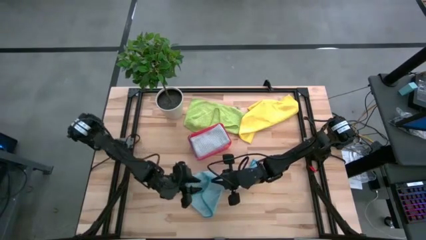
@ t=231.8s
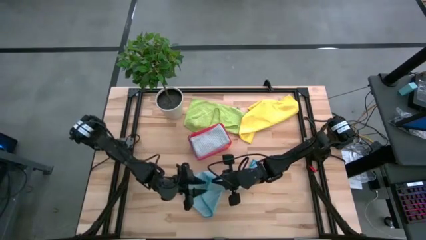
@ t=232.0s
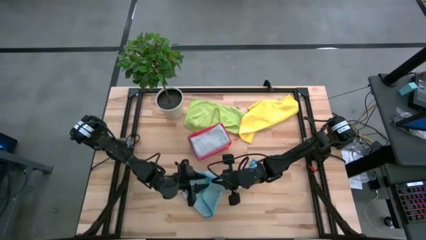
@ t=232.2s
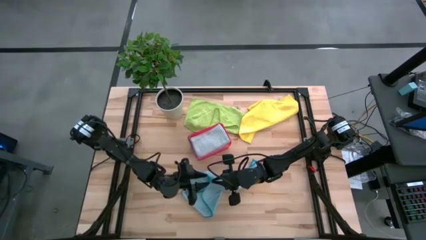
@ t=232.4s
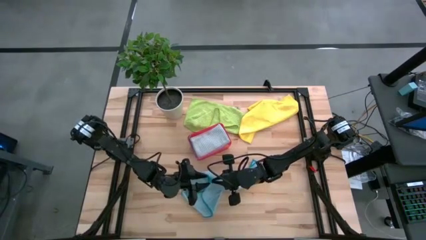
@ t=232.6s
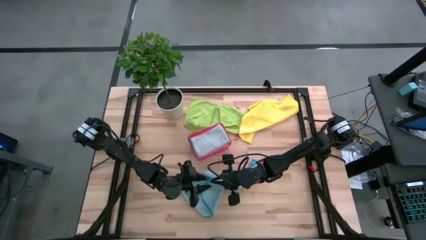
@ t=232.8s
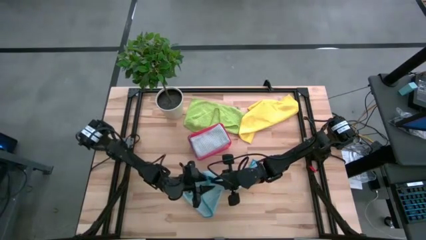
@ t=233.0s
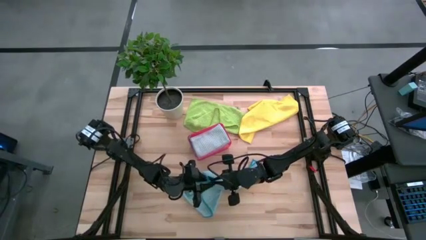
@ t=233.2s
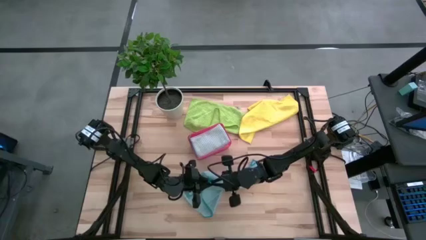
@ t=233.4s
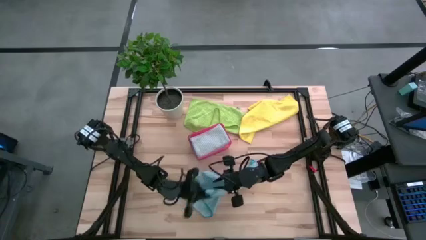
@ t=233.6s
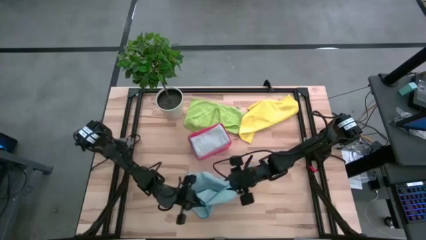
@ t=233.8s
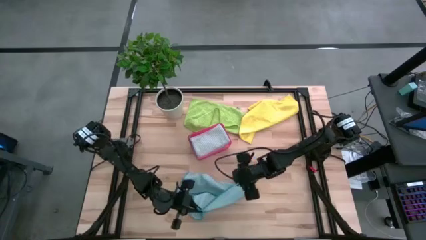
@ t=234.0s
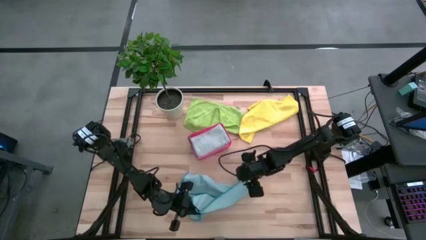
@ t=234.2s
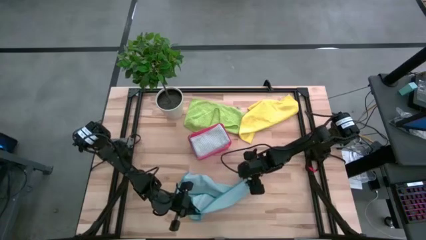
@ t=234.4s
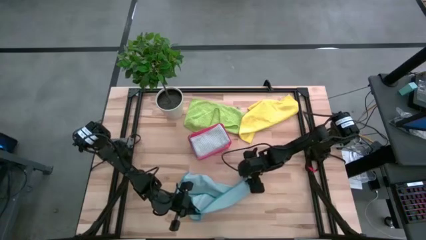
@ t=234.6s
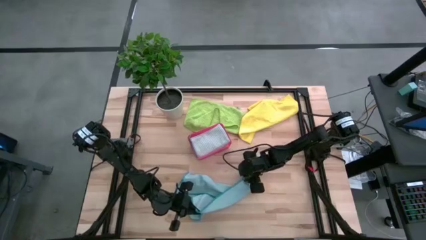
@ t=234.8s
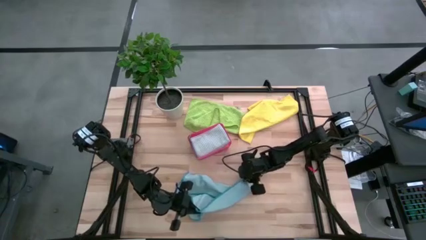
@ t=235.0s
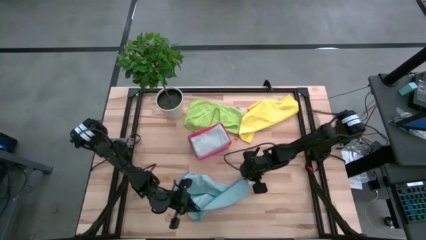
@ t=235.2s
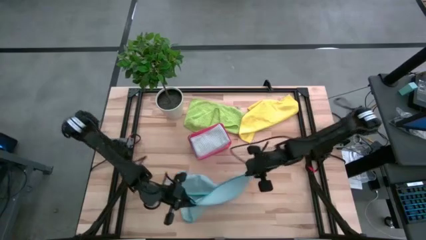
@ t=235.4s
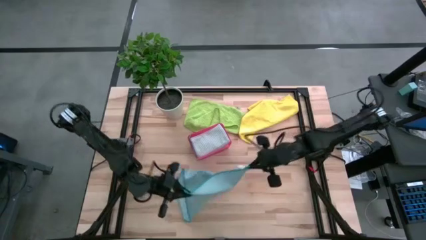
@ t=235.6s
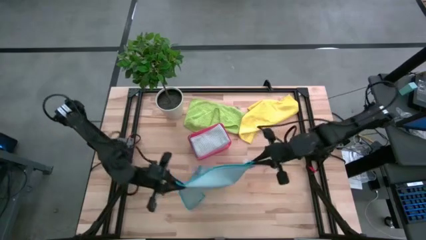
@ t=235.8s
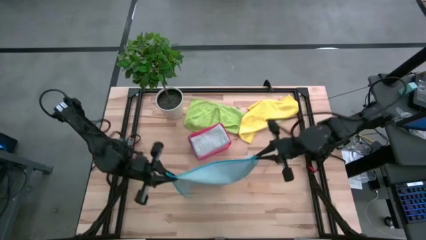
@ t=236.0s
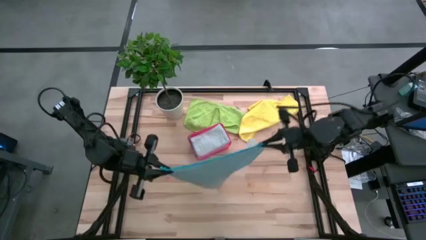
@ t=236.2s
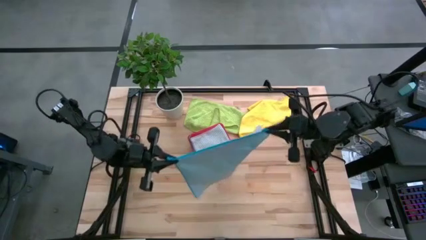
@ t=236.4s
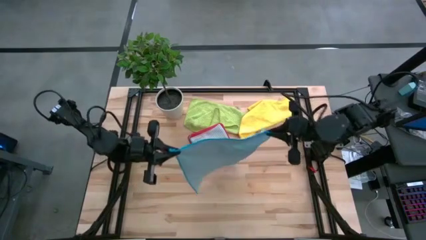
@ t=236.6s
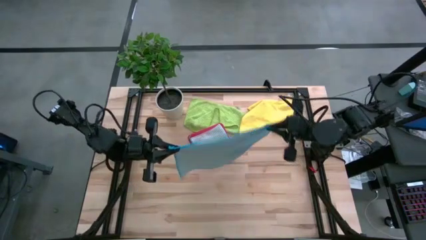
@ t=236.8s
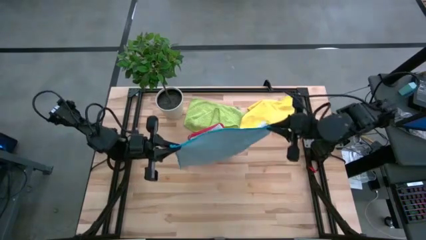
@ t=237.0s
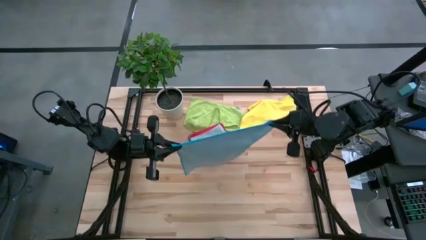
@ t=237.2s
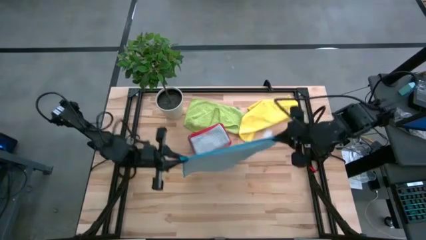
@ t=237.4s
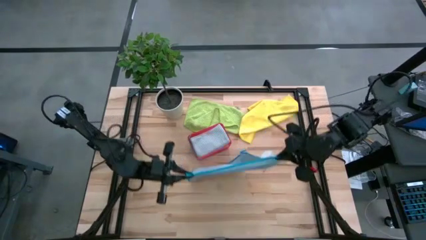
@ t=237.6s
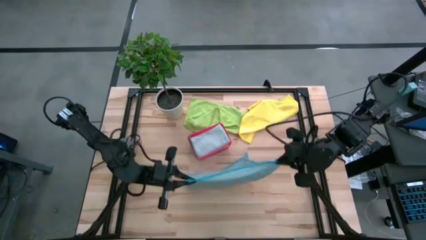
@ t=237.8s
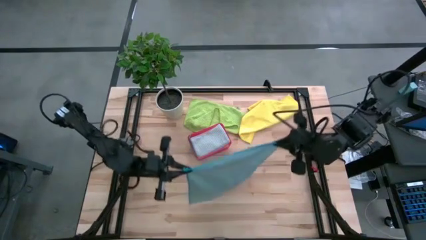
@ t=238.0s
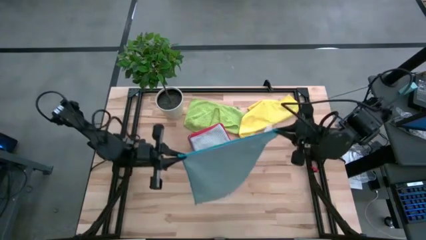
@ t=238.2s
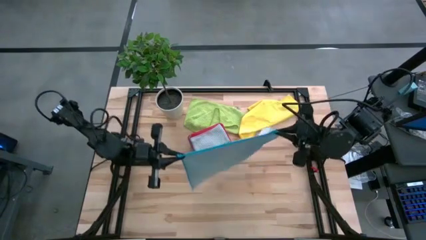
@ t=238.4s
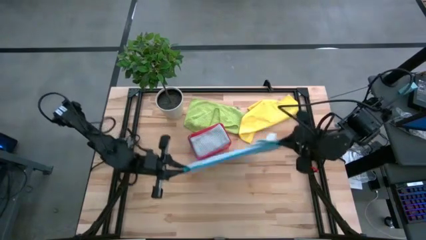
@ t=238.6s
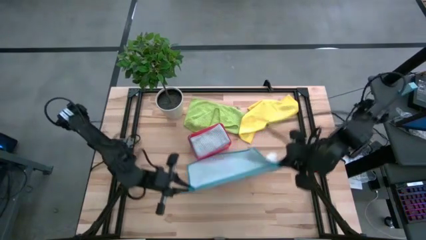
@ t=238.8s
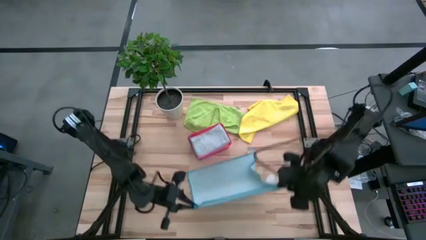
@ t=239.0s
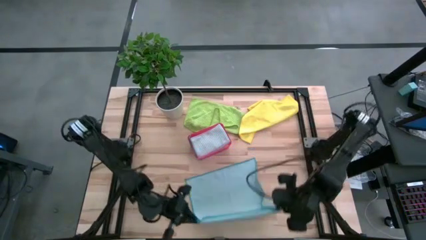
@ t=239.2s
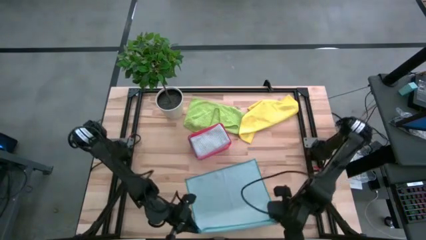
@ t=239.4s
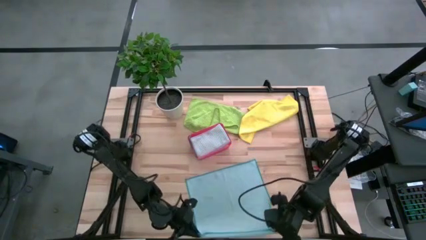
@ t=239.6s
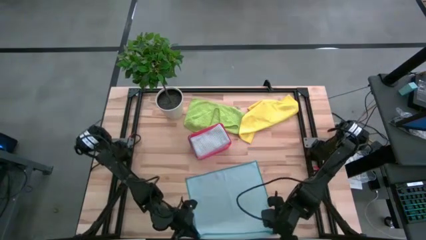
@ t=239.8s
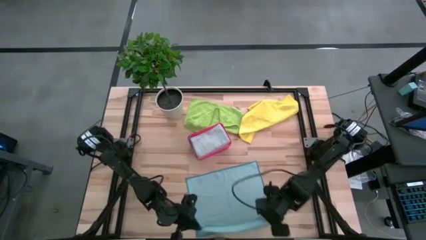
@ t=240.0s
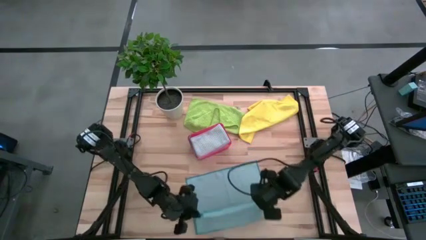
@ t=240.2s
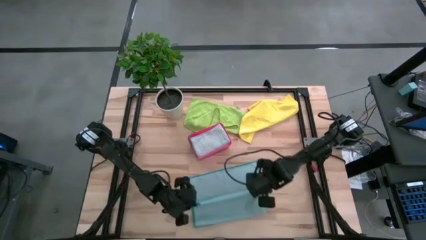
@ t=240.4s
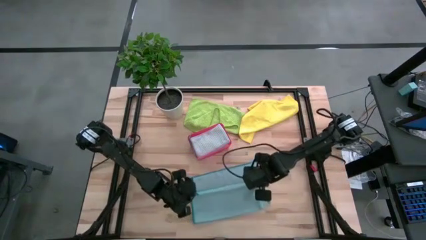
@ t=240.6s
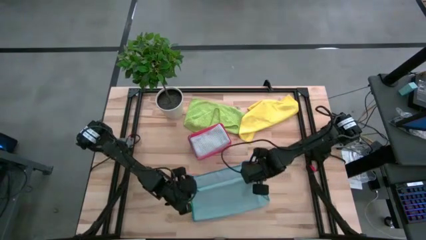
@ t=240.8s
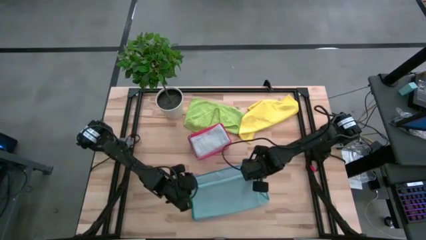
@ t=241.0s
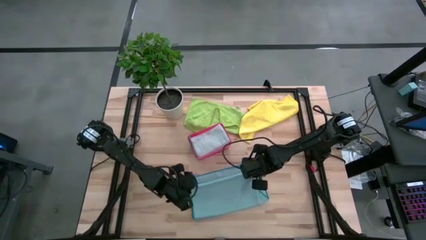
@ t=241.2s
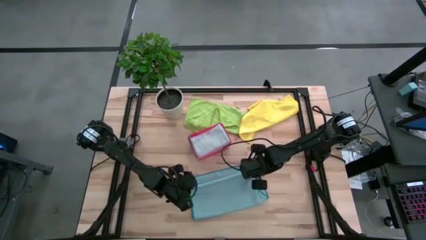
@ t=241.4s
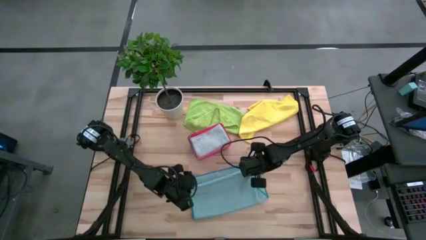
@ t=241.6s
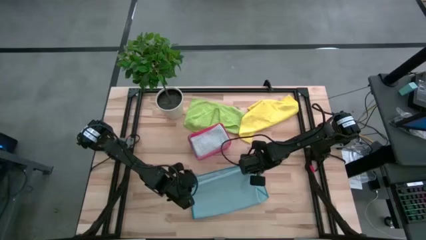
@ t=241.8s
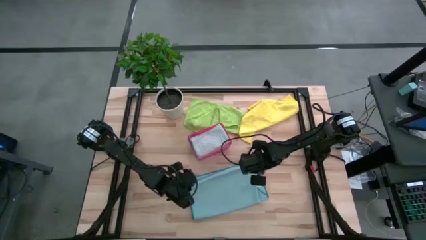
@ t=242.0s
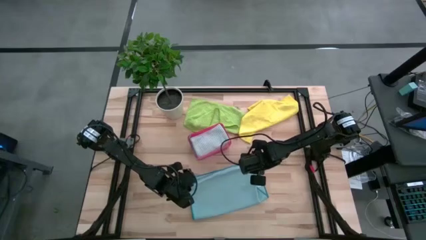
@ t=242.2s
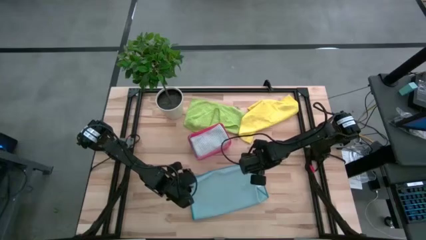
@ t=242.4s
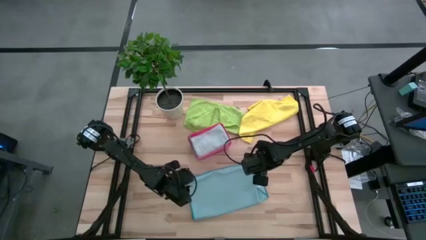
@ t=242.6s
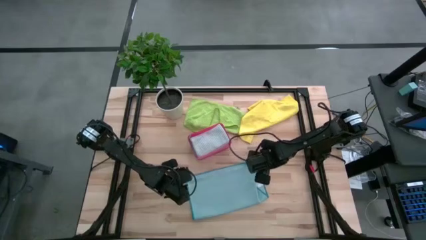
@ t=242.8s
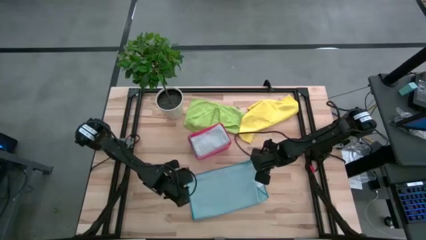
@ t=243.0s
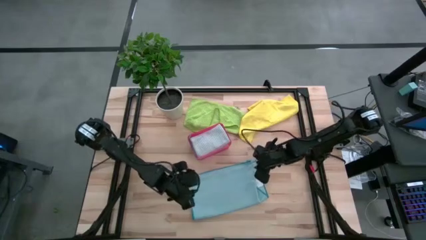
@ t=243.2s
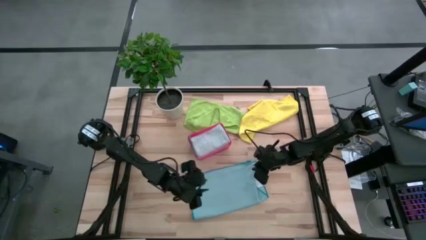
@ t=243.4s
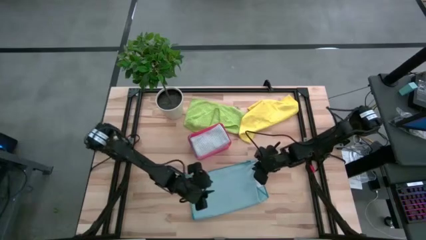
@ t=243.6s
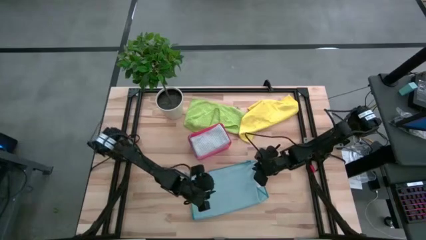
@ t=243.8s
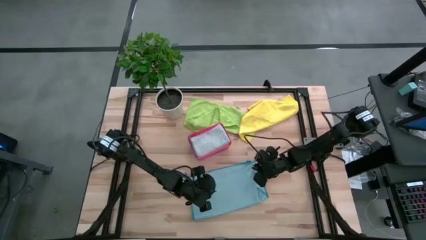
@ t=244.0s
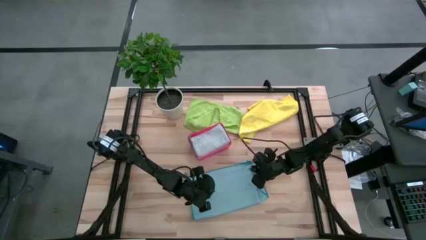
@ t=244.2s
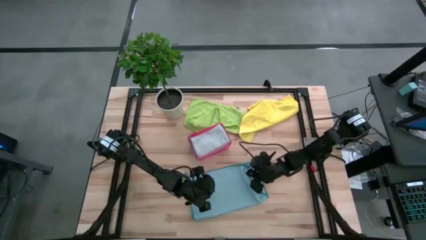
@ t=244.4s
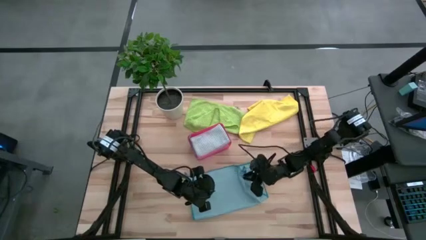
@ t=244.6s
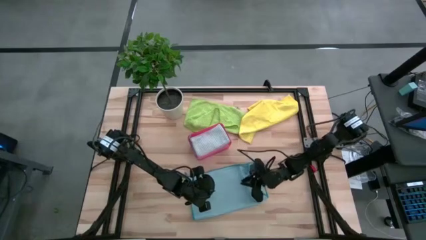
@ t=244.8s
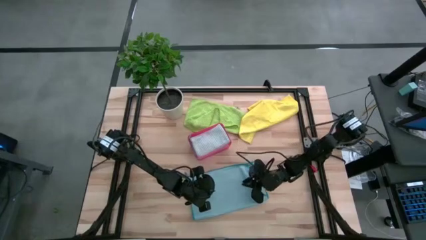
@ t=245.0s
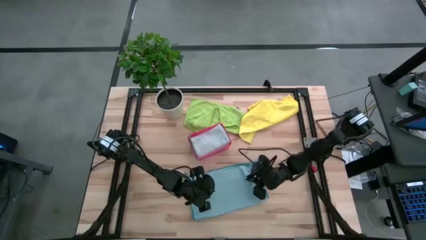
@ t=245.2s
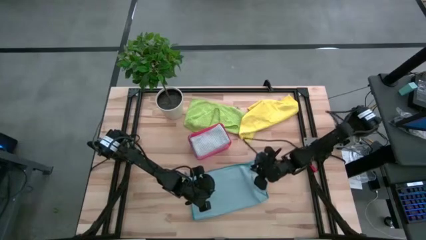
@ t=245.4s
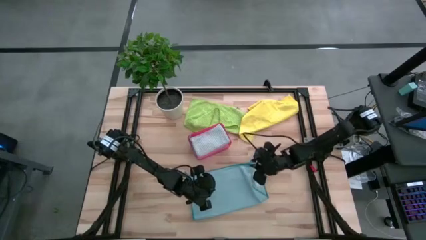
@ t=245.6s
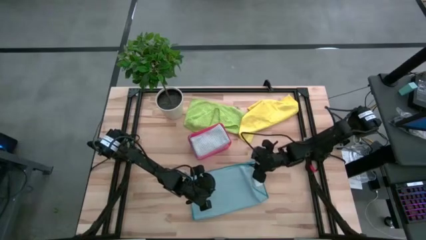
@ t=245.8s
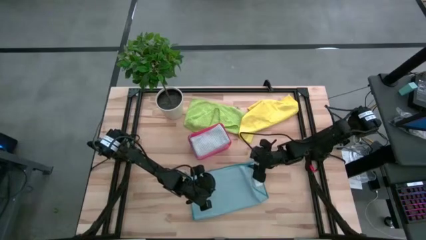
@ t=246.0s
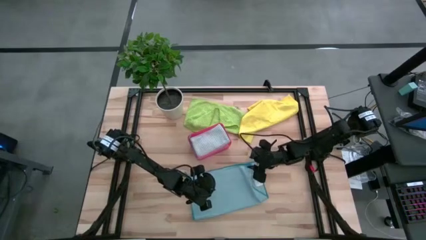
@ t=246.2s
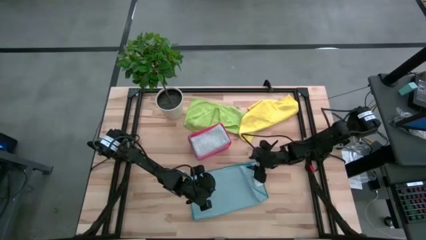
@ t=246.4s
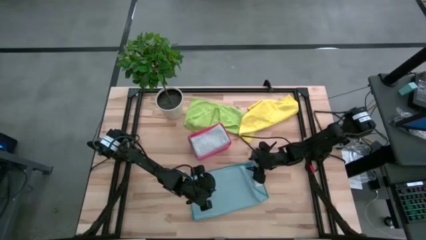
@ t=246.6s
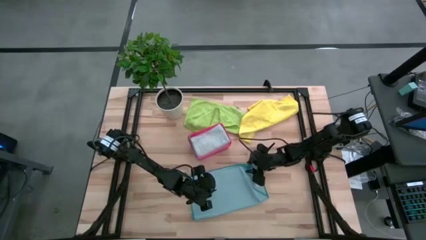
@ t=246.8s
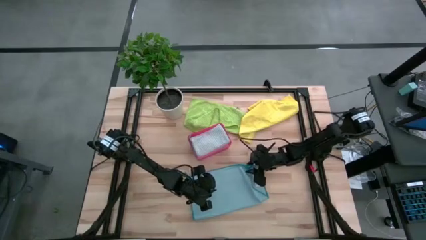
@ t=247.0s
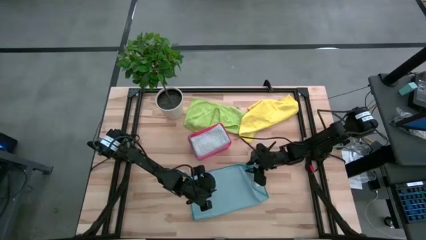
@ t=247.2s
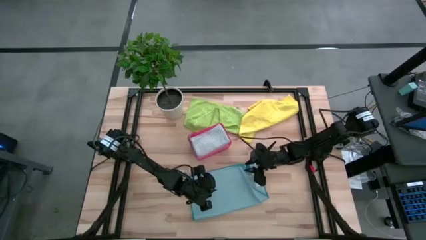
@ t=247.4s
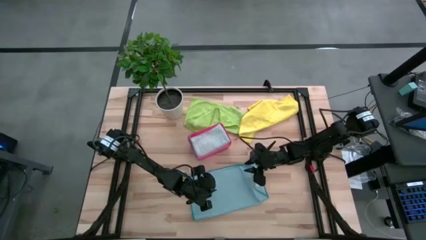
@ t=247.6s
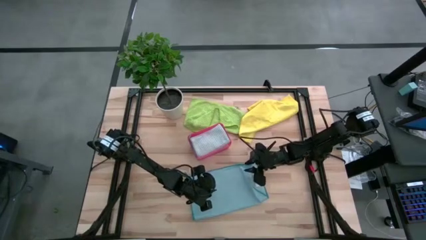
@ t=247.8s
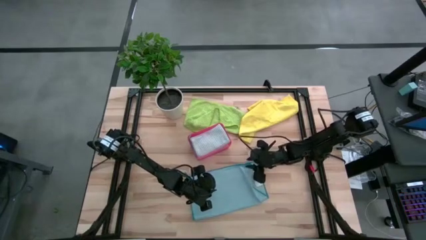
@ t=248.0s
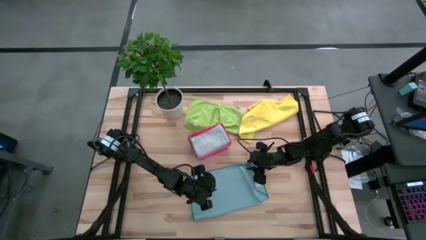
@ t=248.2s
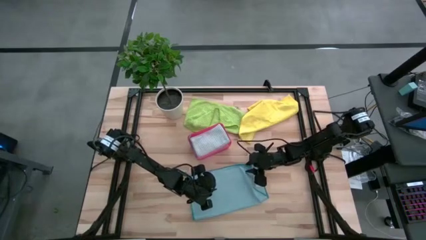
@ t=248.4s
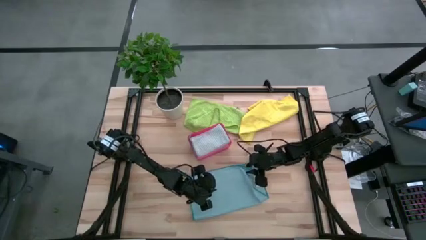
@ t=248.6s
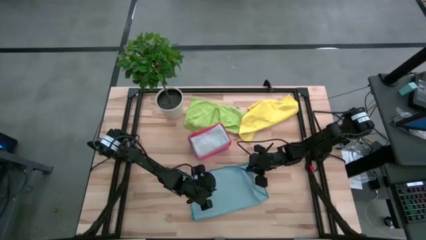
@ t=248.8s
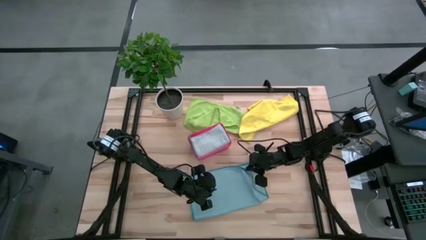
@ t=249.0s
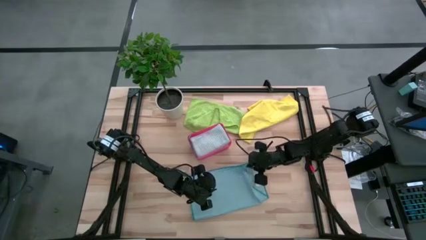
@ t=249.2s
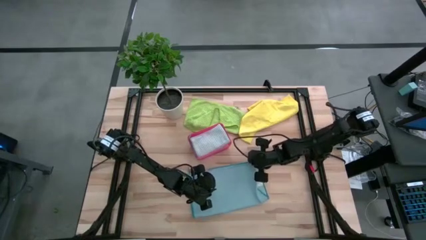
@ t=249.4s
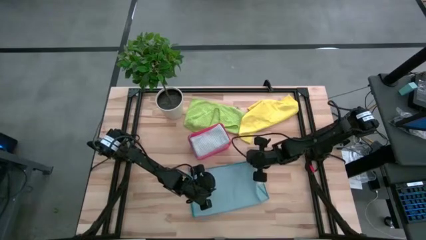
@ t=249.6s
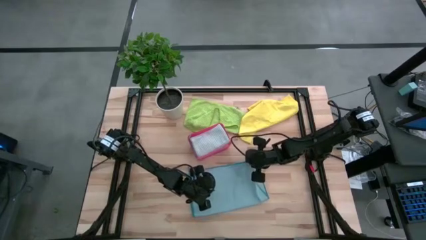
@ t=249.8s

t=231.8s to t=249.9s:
Task: Fold microfiber towels
Fold the blue microfiber cloth
